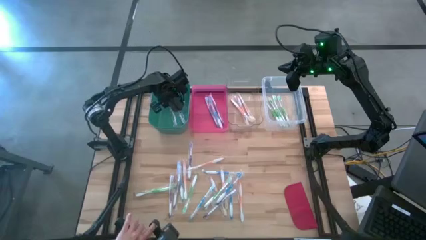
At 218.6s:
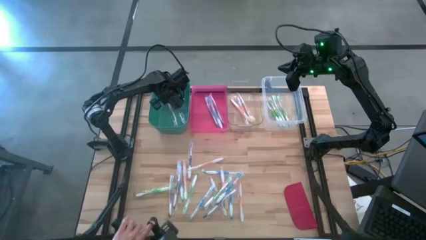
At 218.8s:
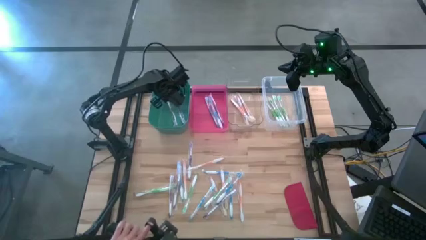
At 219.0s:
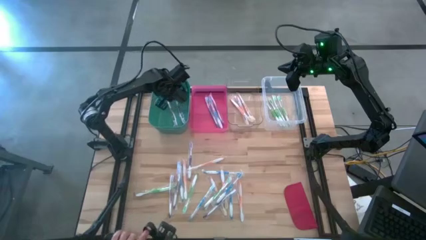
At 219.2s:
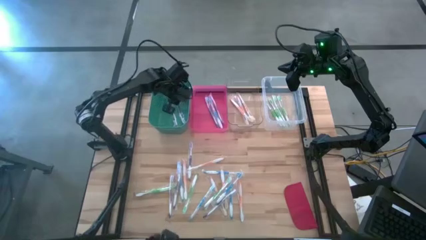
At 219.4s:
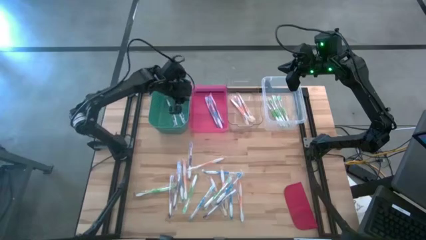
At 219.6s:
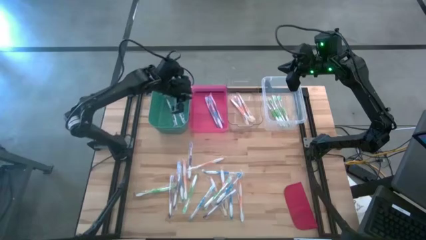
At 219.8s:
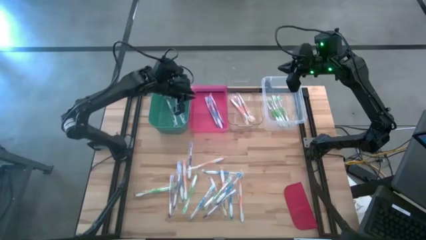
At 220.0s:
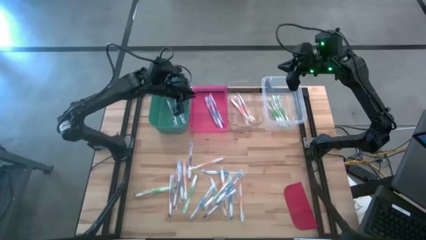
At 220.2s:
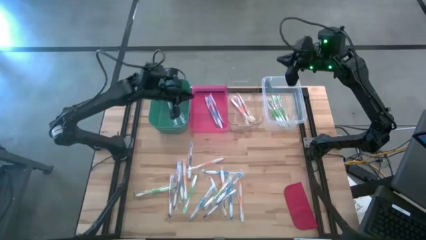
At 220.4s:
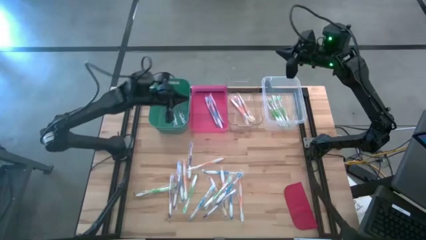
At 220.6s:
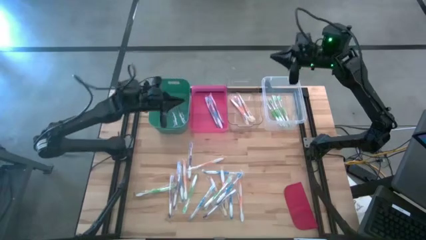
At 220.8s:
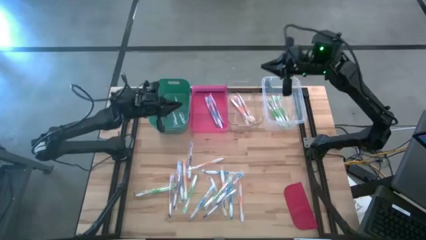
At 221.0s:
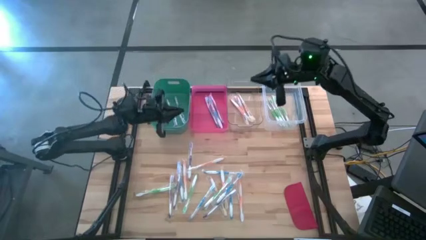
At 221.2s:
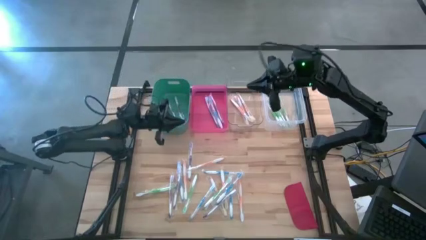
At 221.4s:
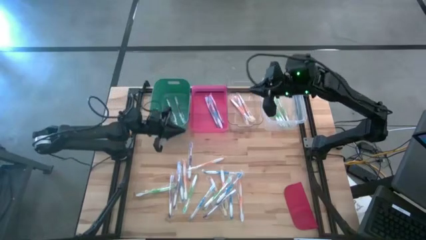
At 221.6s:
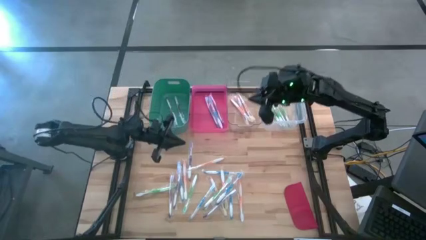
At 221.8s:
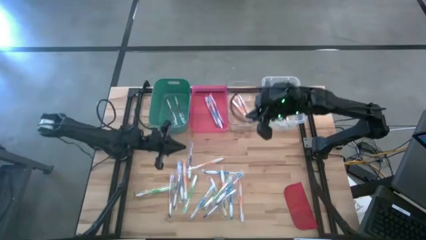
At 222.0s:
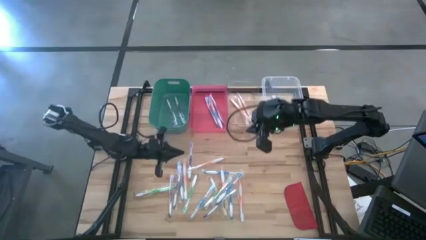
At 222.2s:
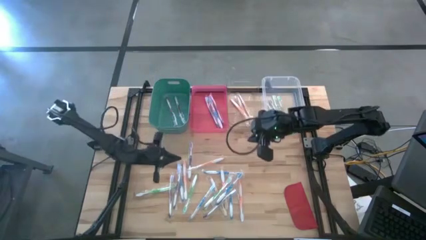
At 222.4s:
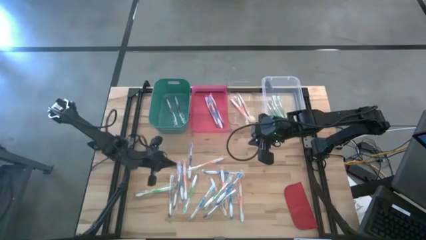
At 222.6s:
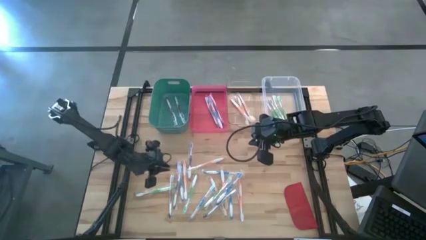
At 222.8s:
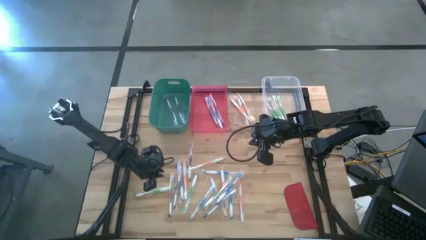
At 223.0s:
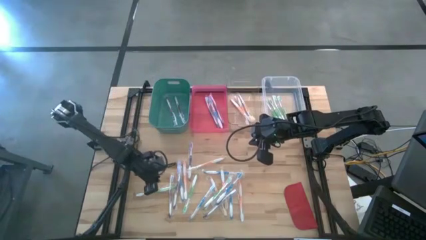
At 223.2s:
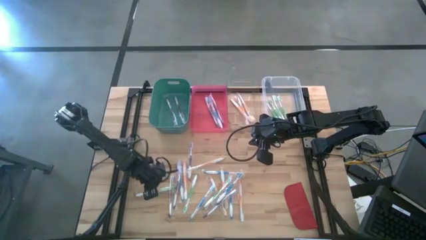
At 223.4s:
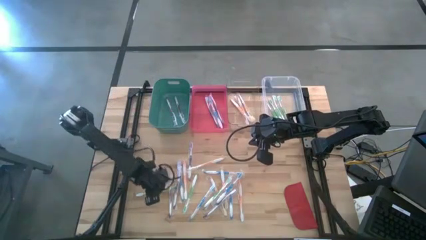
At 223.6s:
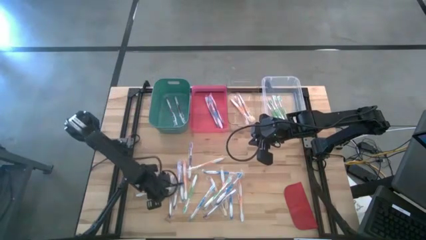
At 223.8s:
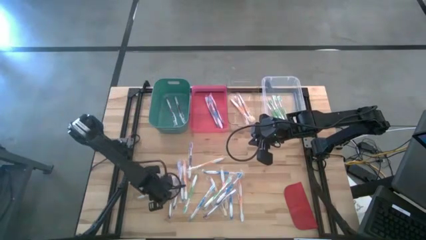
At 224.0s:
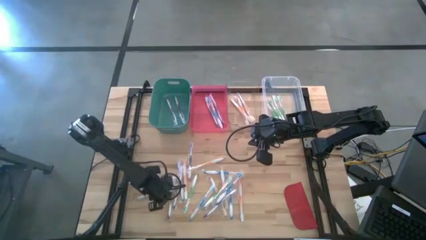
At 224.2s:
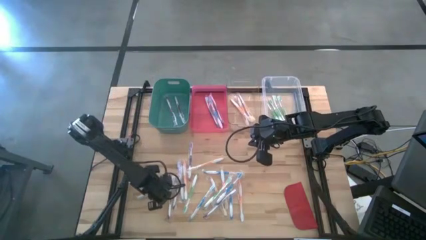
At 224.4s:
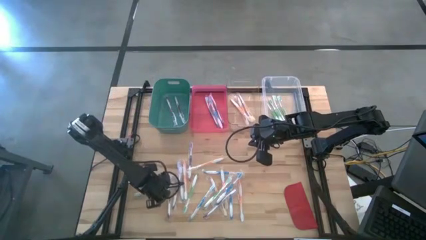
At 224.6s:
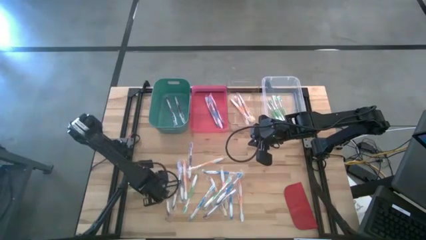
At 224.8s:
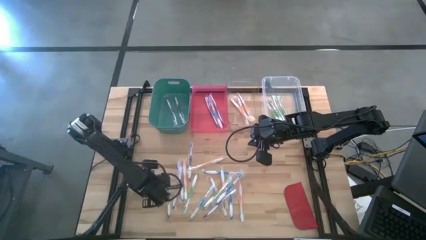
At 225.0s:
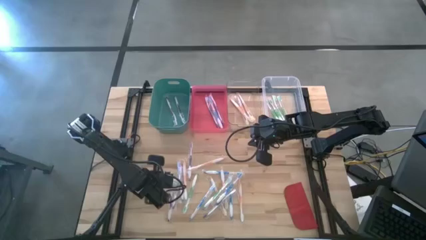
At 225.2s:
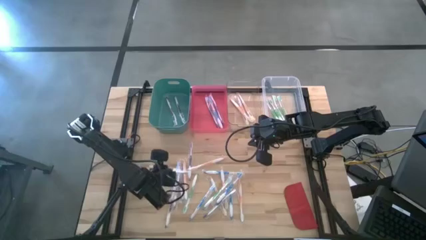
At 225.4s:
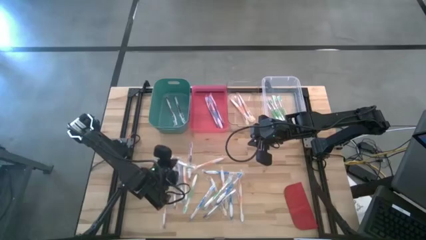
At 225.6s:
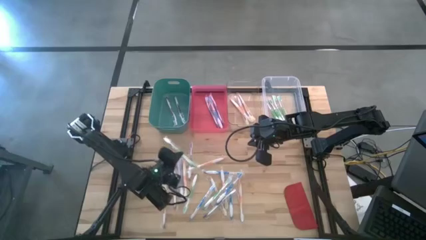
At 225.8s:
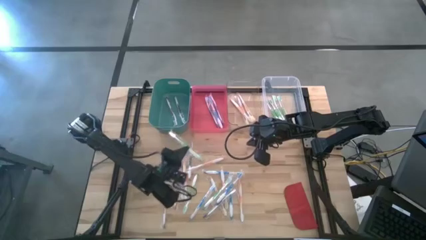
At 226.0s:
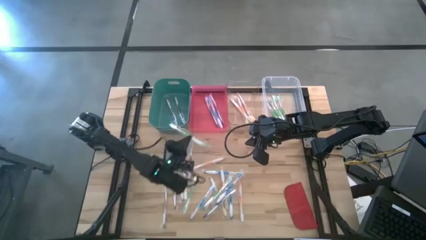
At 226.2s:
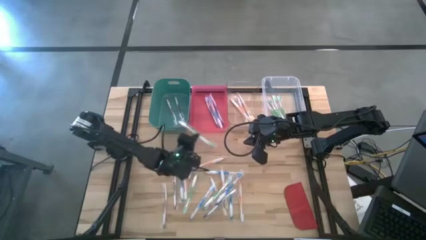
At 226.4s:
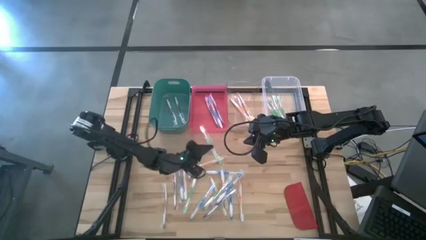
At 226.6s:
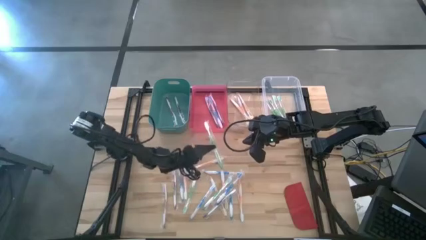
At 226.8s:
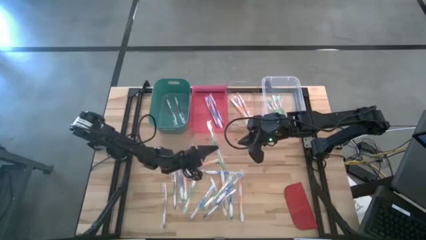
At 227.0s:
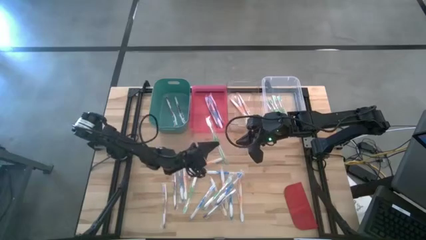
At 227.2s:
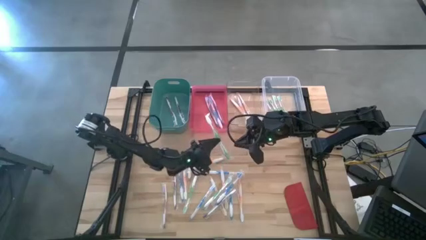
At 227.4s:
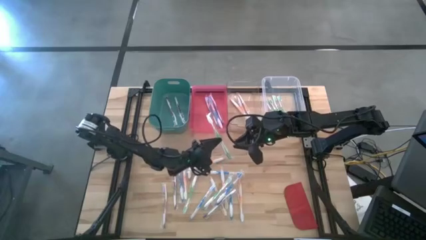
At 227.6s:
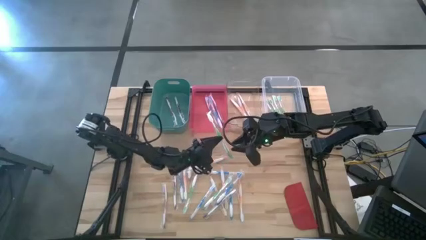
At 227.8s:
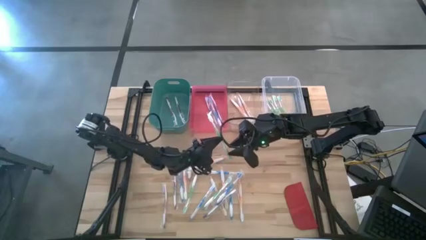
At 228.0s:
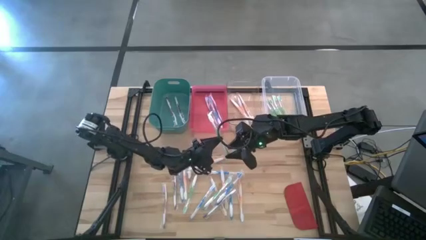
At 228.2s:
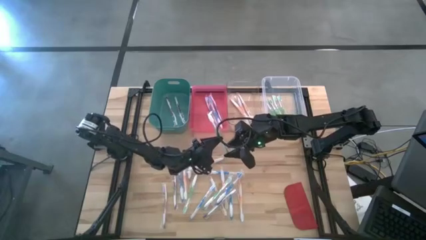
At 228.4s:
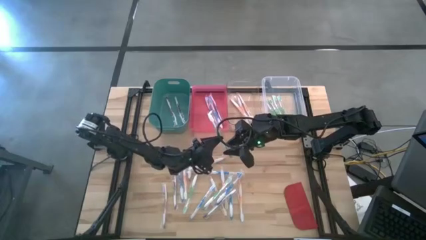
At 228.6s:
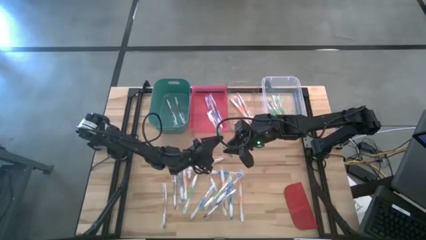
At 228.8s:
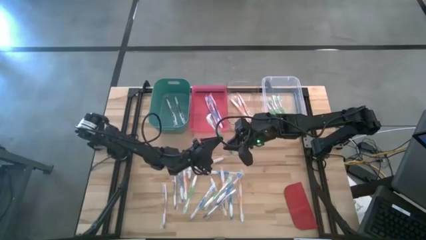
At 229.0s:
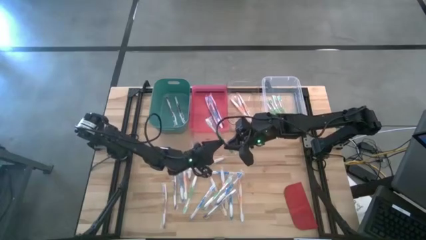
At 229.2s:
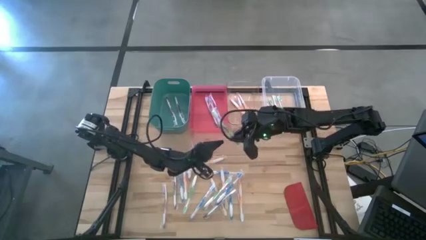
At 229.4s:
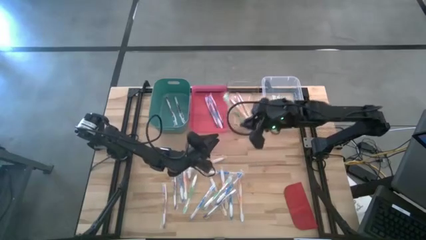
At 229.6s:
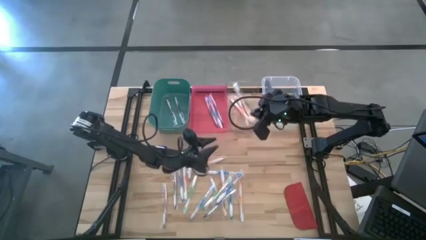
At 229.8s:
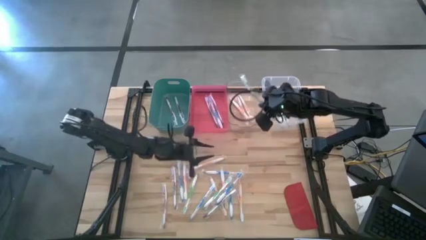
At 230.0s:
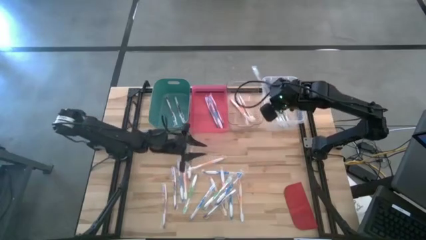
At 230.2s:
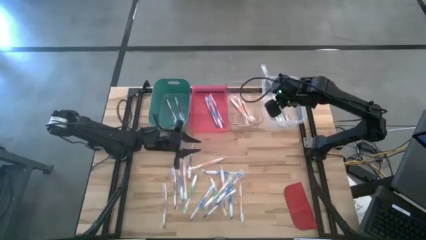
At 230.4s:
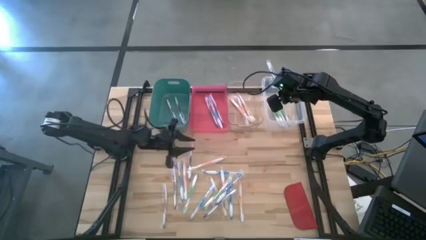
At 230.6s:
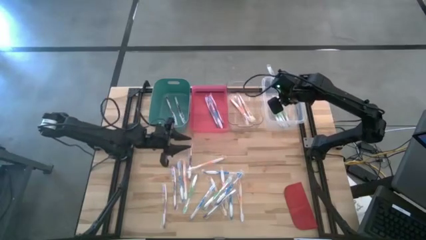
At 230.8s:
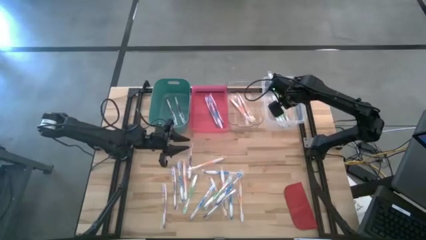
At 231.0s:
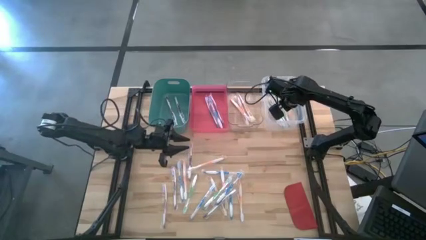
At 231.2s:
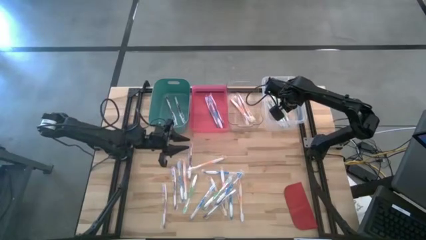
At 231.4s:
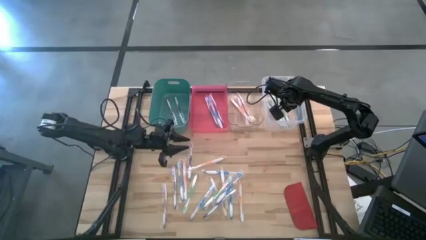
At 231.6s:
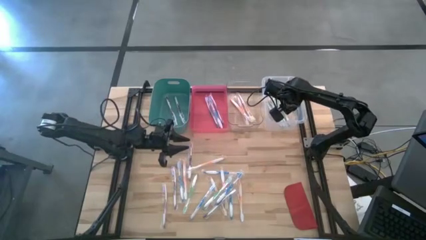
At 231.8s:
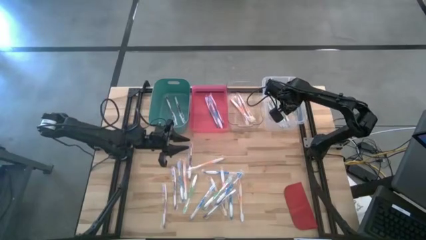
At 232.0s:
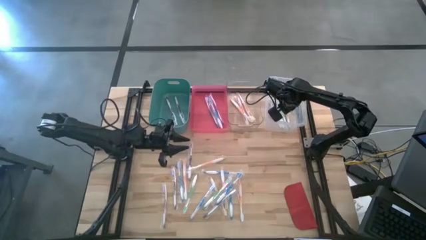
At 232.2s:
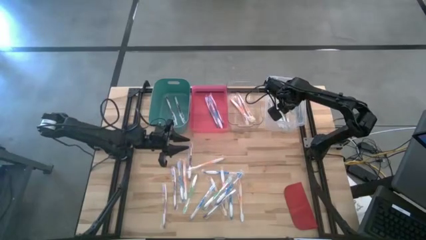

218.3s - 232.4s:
Task: Pick & Place Toothbrushes
Put the green toothbrush into the white bin

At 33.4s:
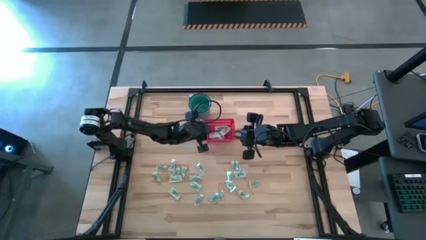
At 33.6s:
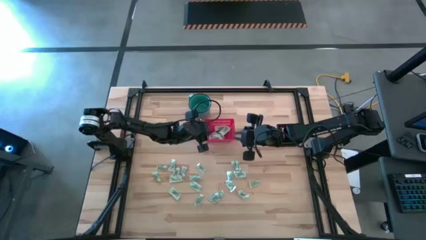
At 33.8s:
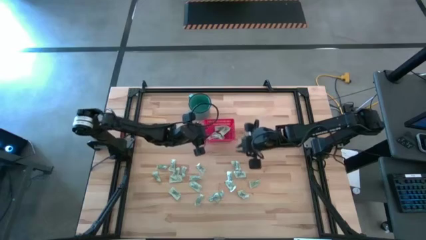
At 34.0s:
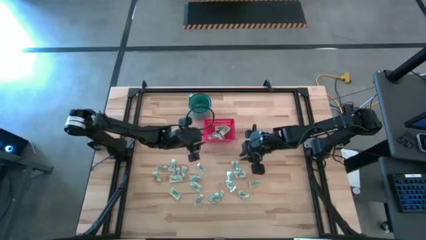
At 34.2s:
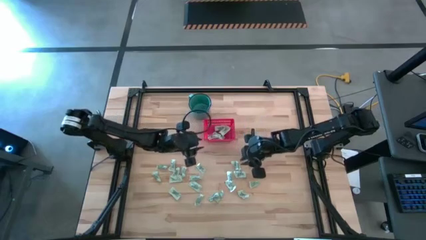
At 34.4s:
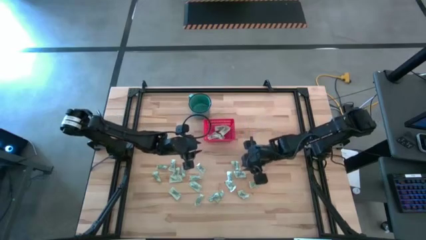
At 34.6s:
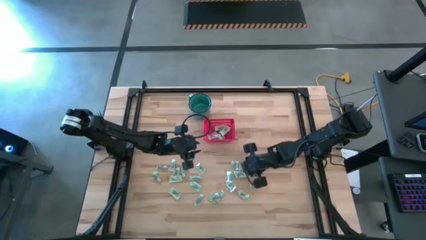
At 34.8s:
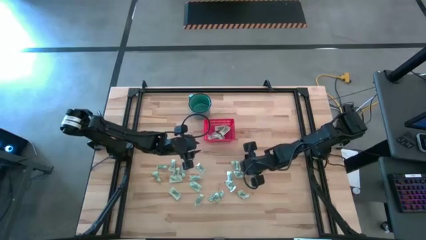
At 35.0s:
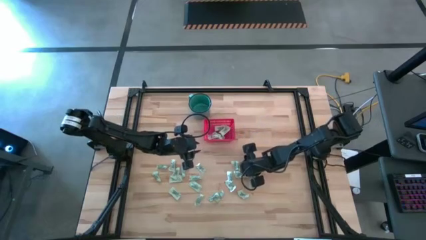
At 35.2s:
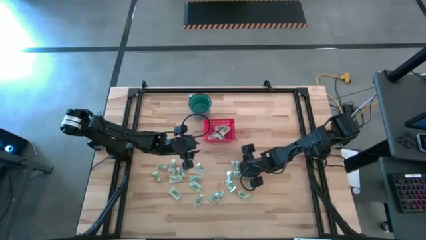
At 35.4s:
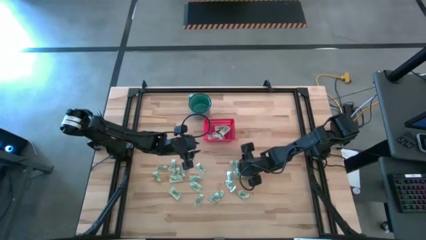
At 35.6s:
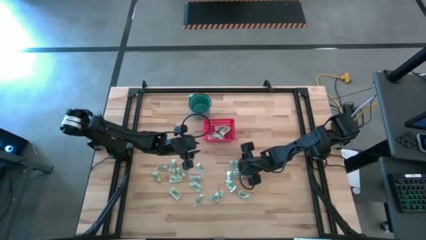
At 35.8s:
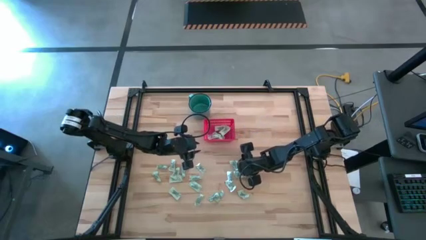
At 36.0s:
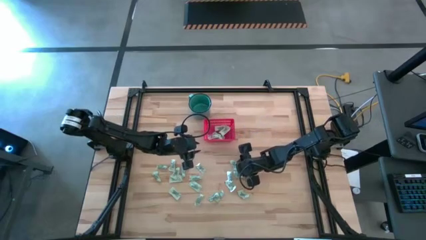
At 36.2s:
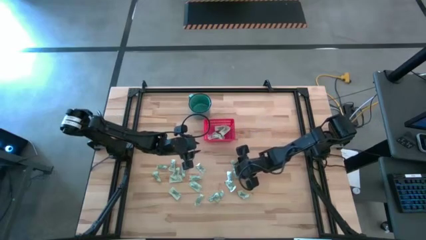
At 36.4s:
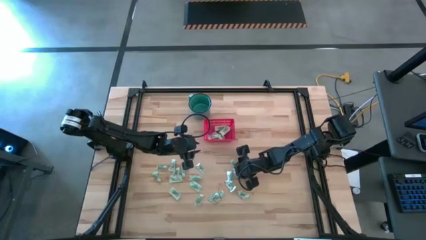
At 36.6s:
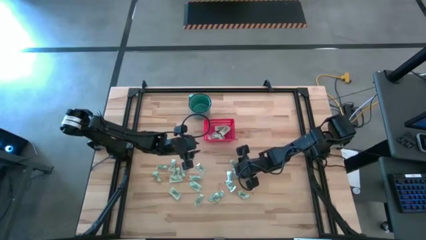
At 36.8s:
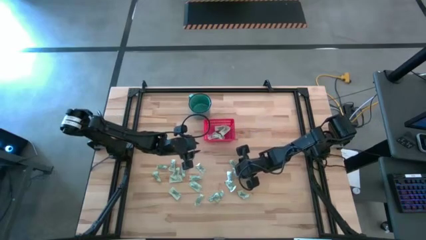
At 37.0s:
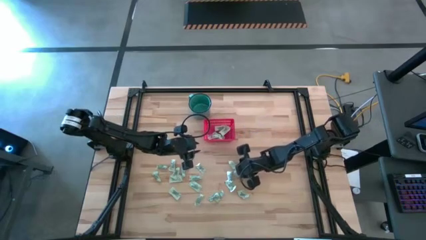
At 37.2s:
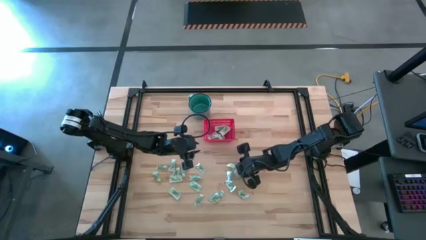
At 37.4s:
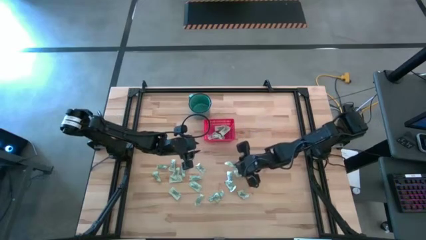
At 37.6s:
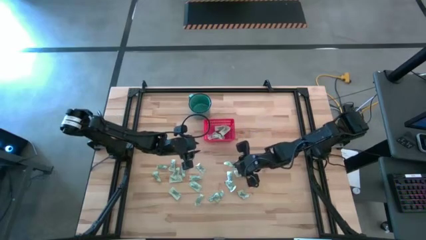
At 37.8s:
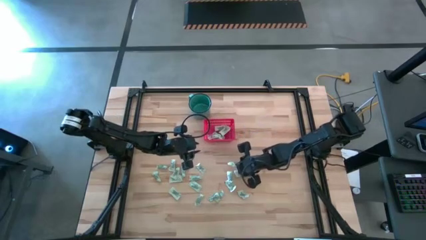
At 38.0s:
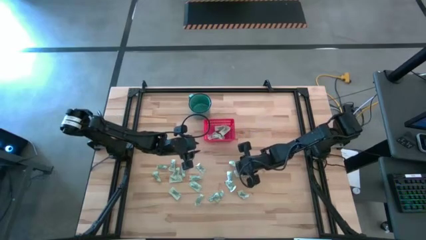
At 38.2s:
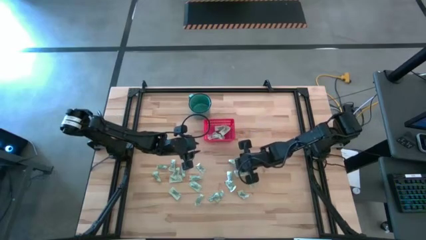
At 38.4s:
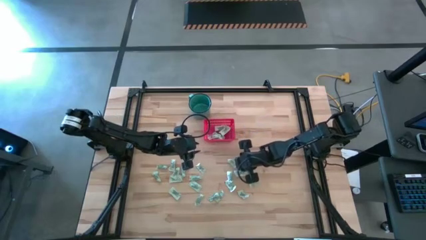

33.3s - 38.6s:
Task: Pick and place items into bin
Put the light green stevia packet into the red bin
